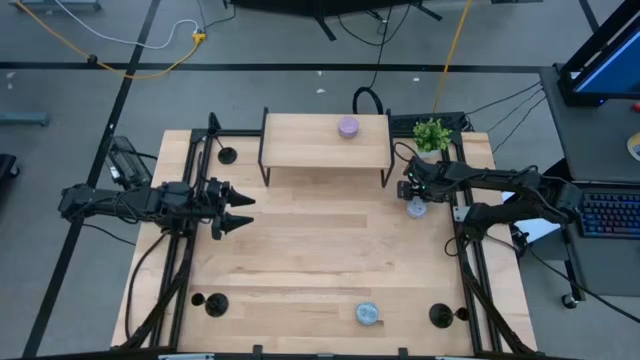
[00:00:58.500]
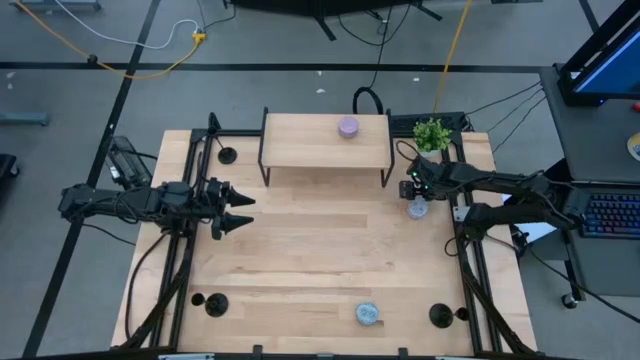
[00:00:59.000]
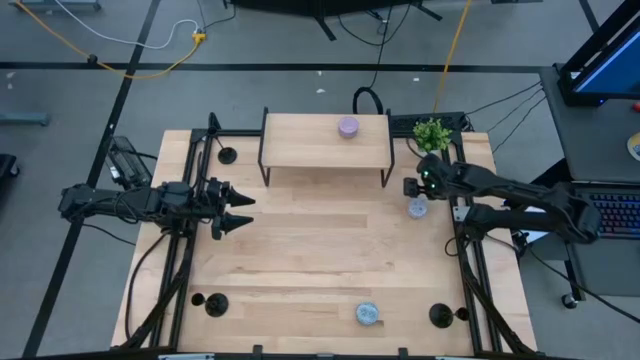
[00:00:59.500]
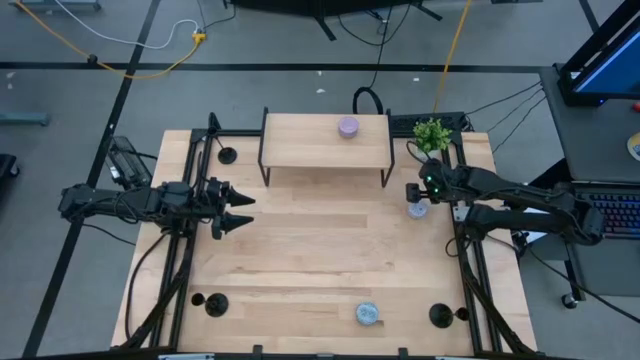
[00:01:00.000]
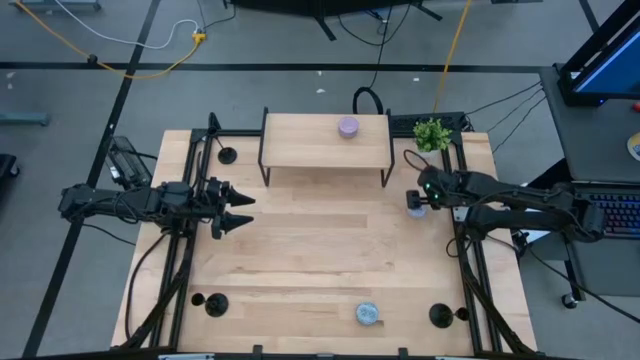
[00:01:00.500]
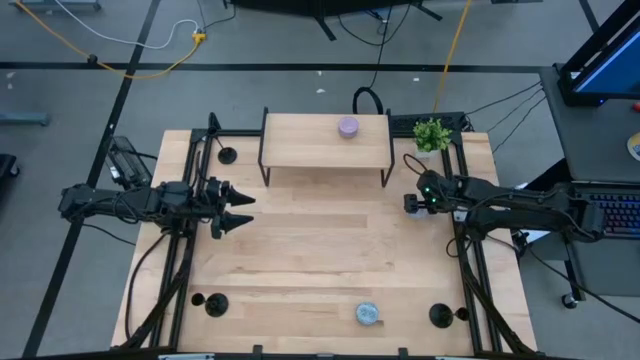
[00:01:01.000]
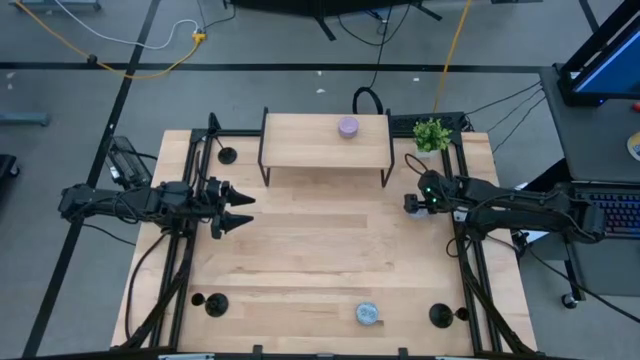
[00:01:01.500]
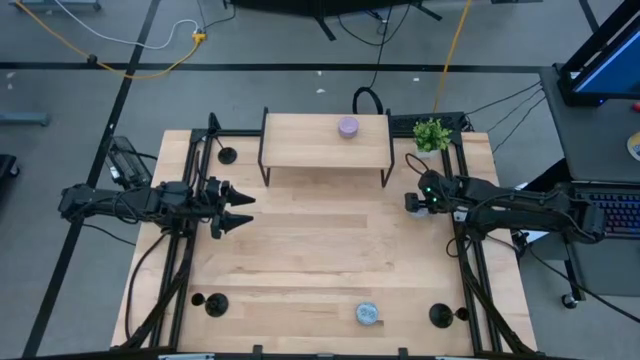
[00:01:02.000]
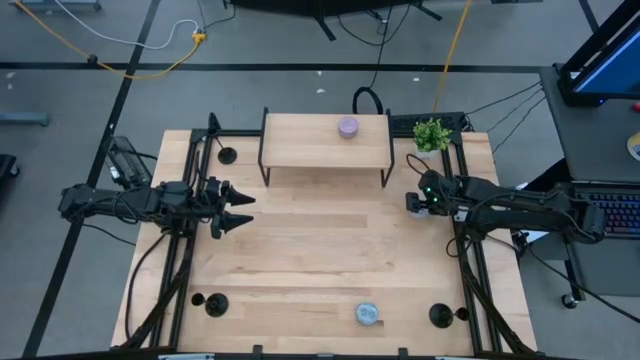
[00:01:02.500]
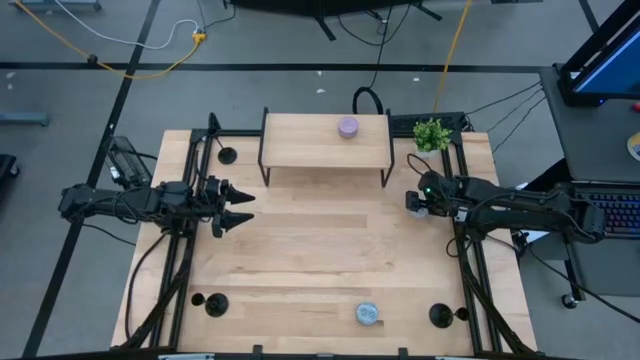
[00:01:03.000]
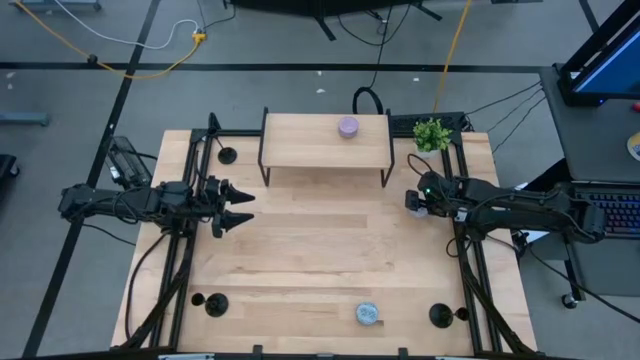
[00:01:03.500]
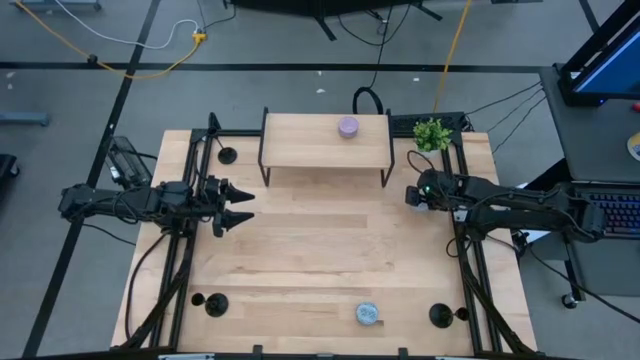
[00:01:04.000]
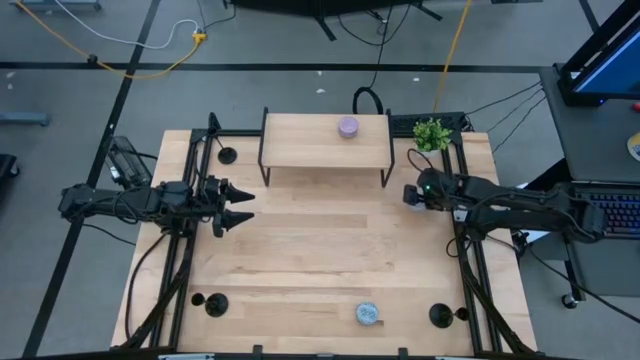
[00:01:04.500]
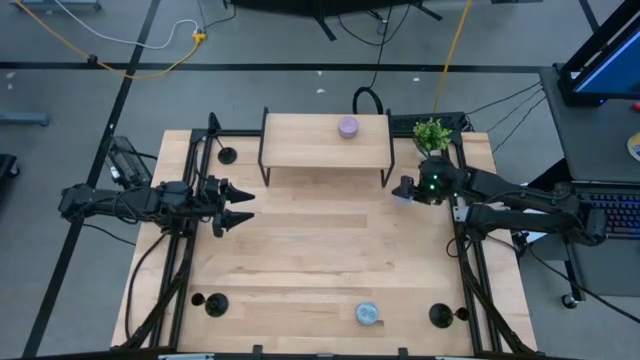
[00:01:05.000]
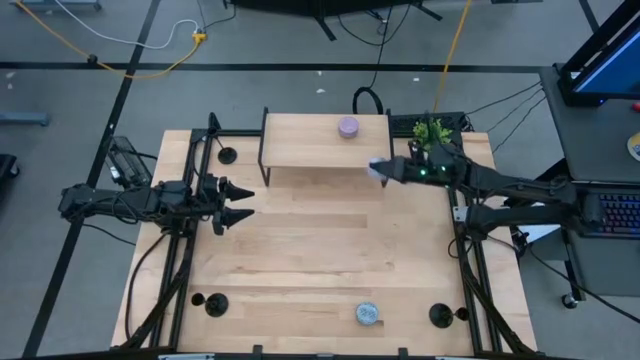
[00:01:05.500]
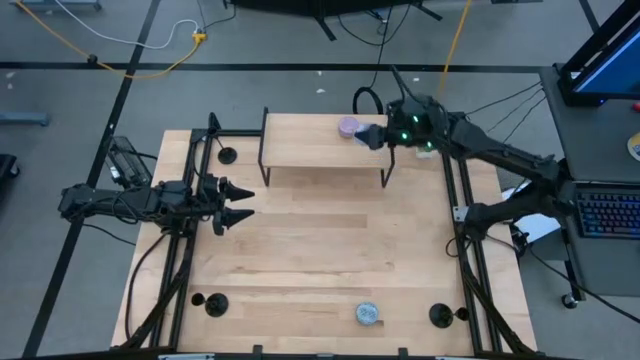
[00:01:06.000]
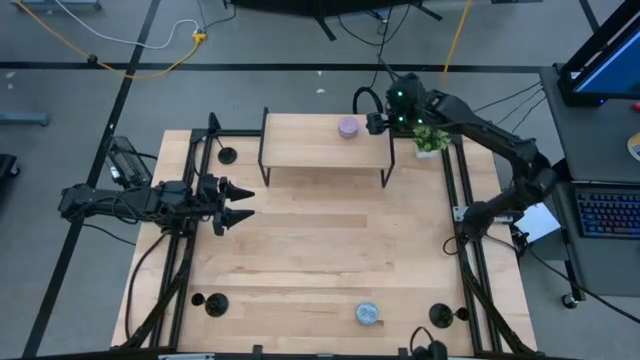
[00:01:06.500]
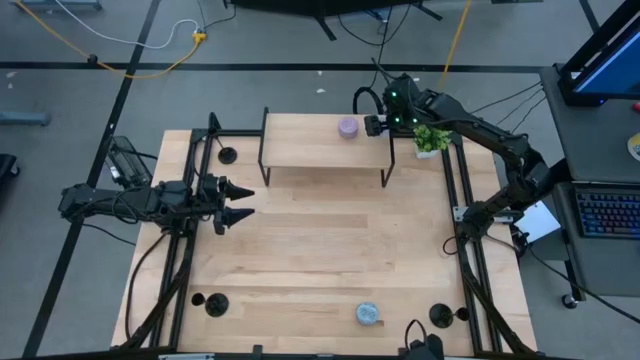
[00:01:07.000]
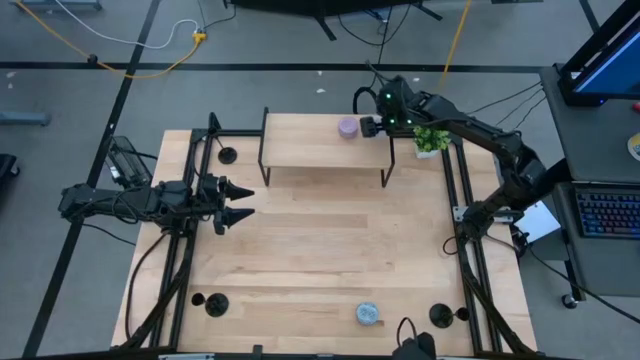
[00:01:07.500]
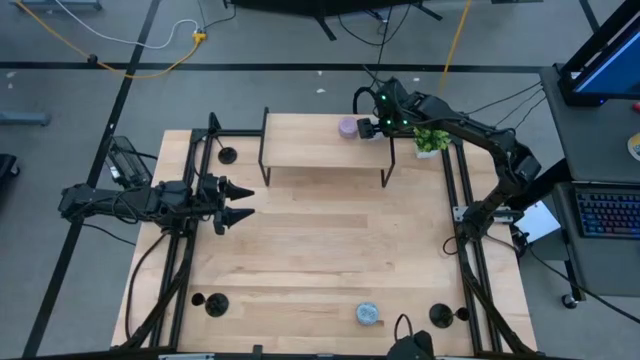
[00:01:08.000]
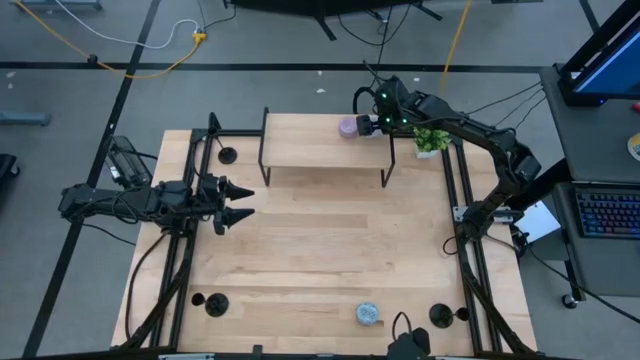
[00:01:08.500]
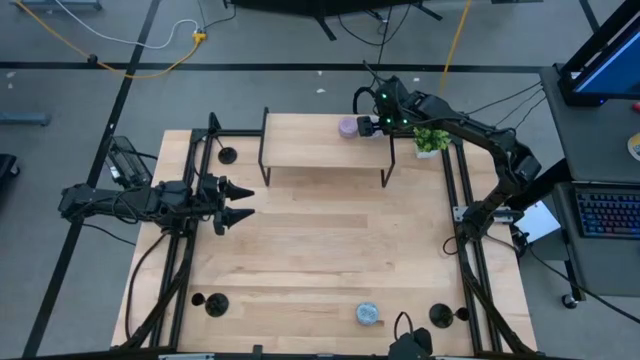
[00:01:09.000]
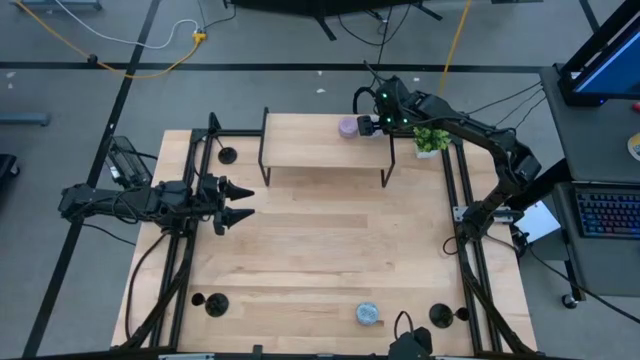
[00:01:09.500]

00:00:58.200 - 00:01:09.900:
Task: Pick & Place candle stick holders
Put the white patterned scented candle on the shelf

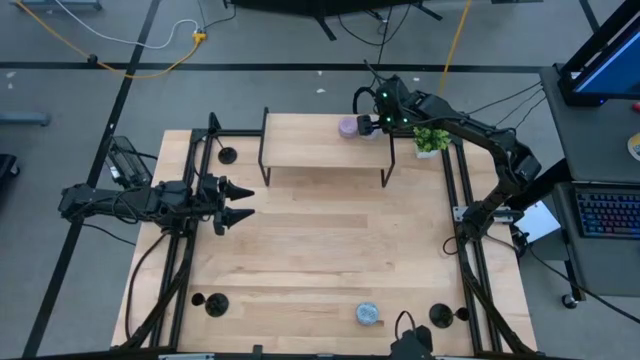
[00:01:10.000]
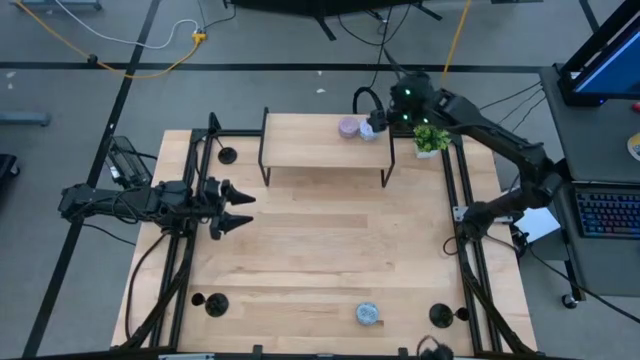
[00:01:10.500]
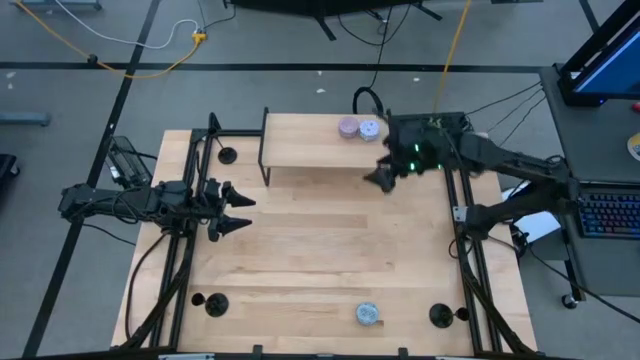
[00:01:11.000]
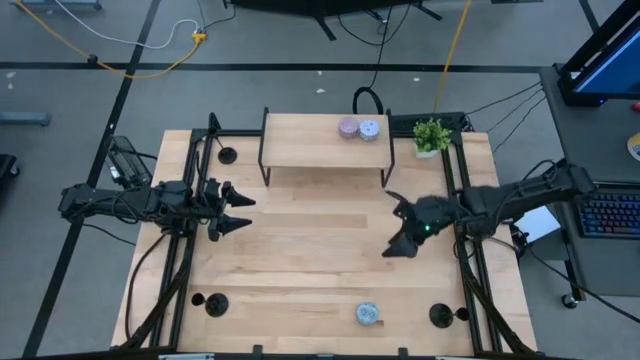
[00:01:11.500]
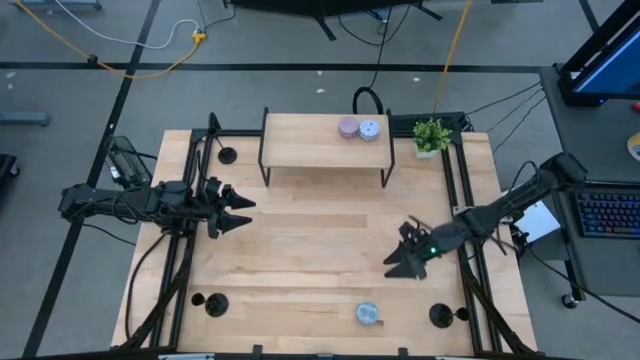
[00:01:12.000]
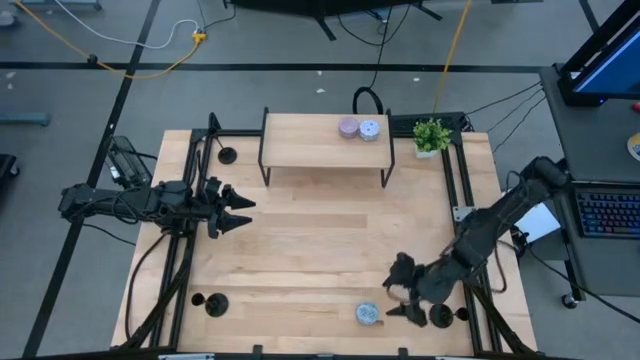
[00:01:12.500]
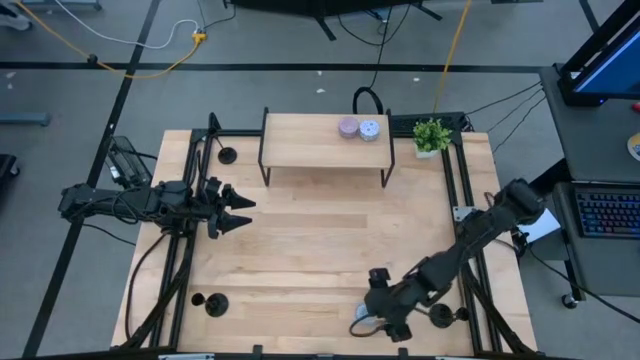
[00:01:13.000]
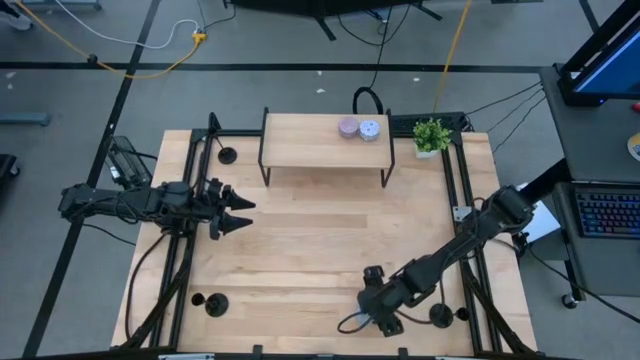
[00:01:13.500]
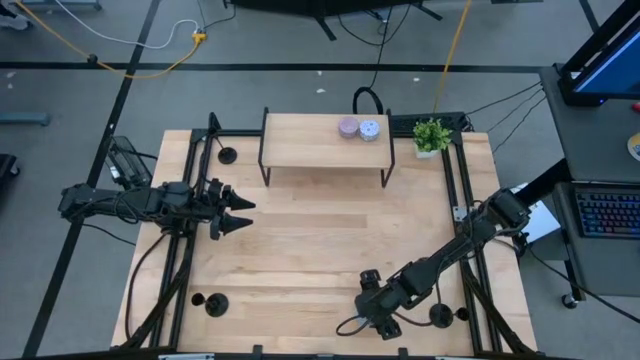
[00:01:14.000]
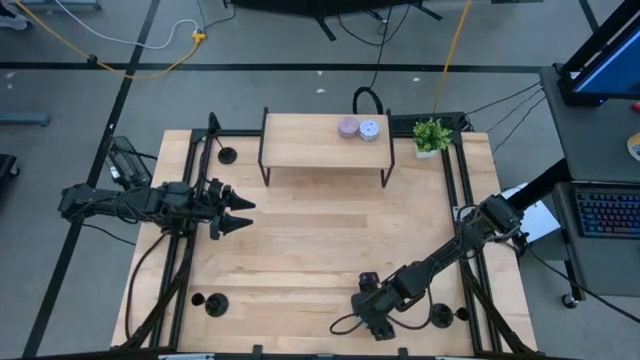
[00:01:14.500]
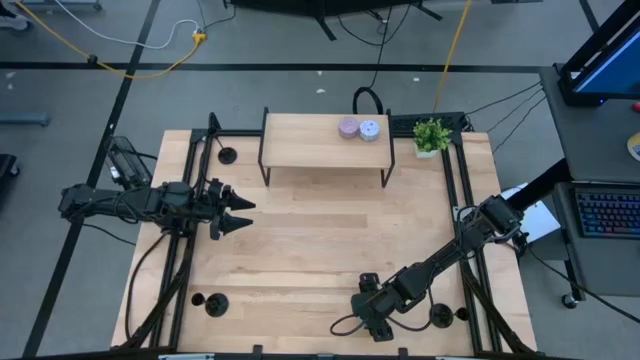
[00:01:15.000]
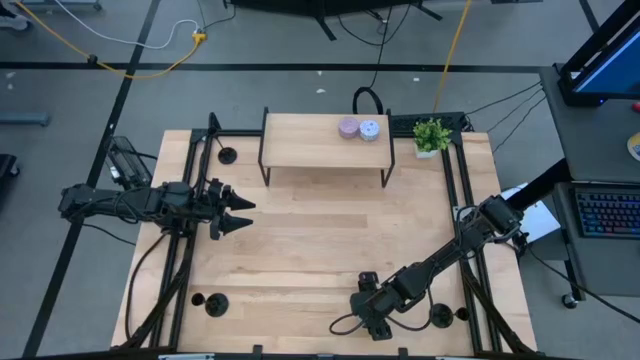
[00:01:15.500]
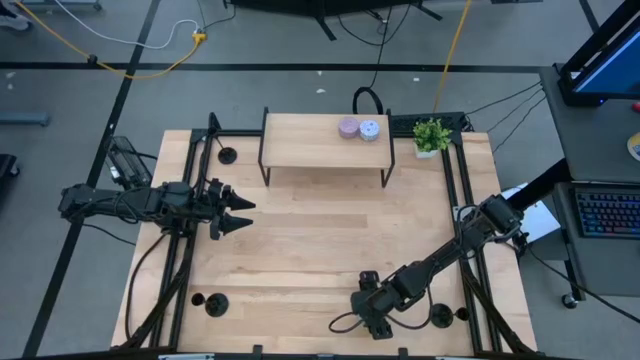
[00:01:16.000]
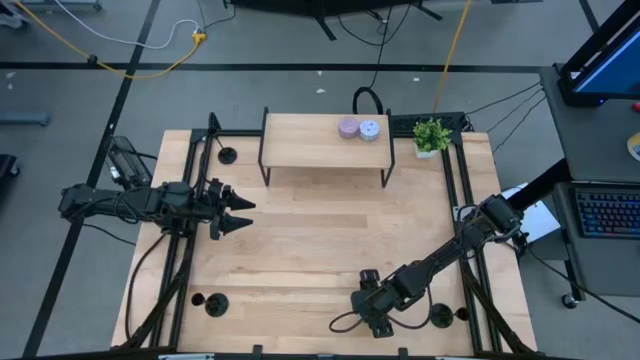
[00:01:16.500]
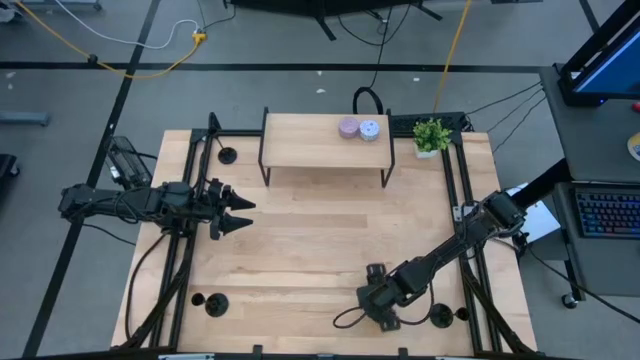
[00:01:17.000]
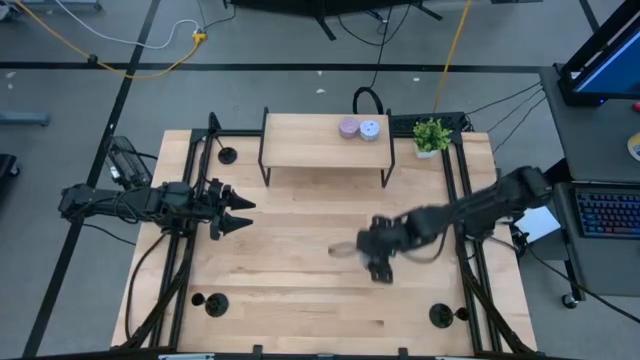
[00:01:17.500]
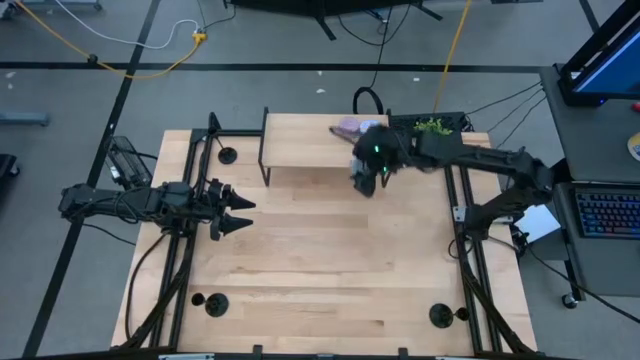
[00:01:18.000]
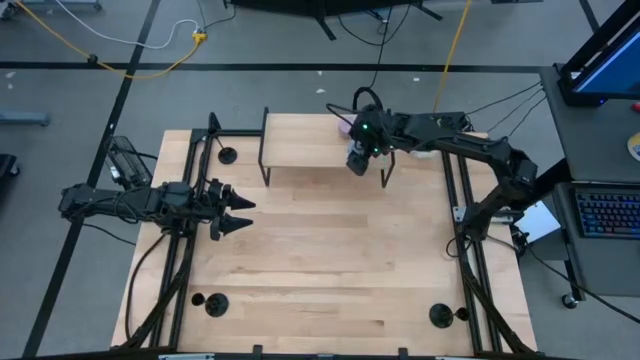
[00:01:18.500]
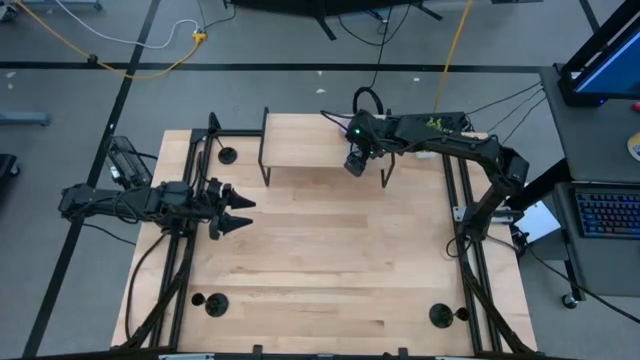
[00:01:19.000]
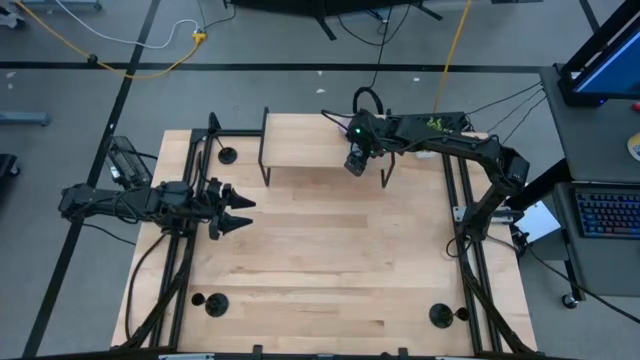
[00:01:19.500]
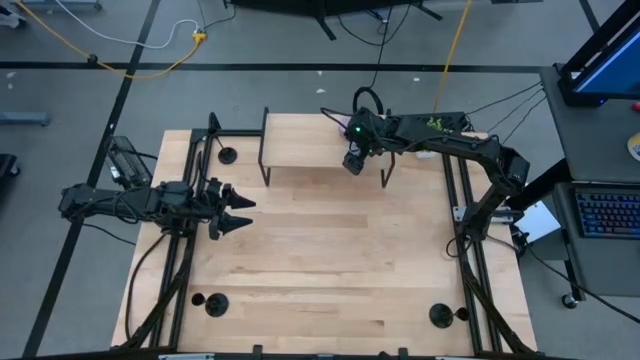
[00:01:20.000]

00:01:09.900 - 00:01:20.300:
Put the blue patterned scented candle on the shelf
